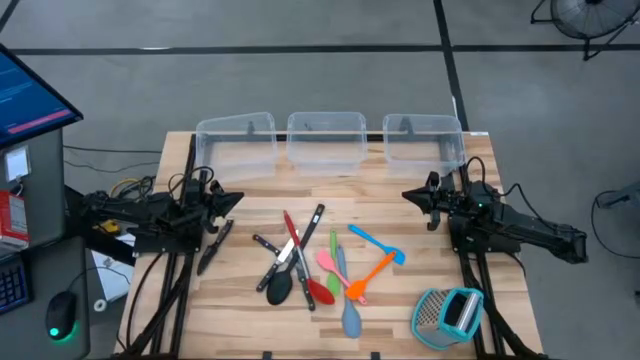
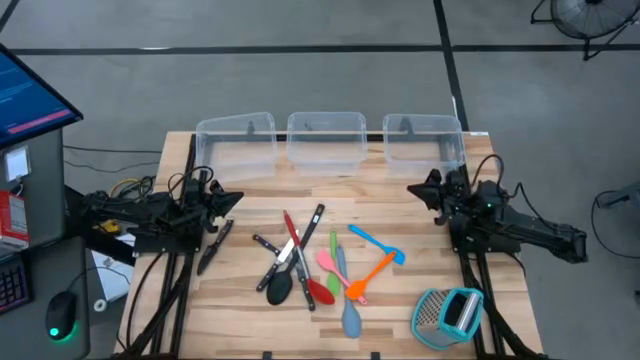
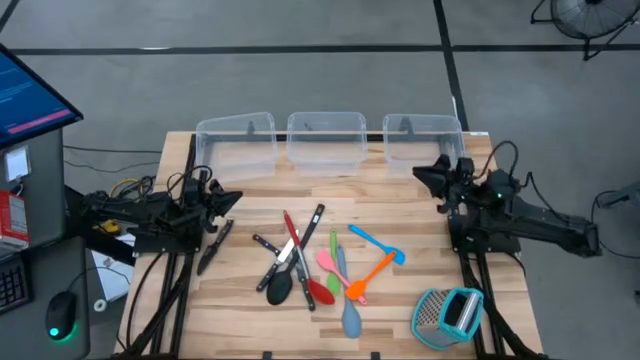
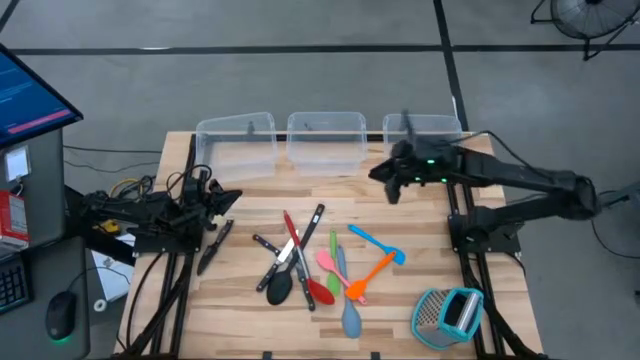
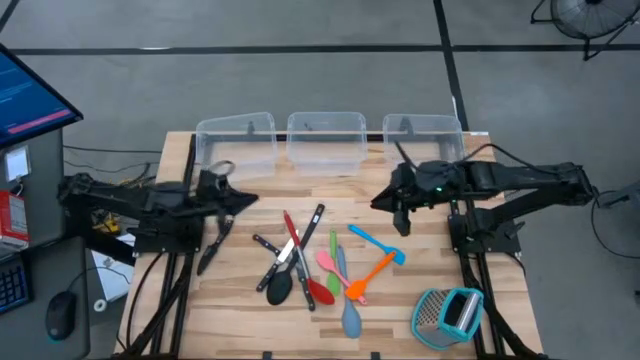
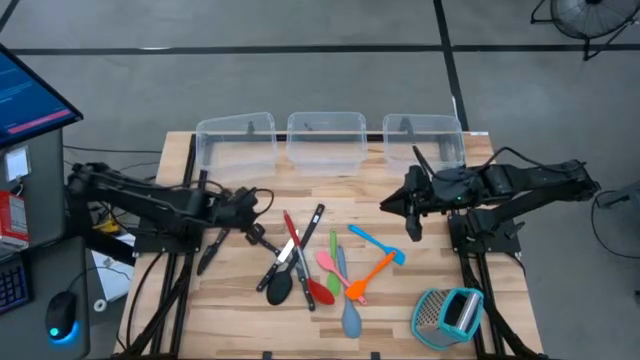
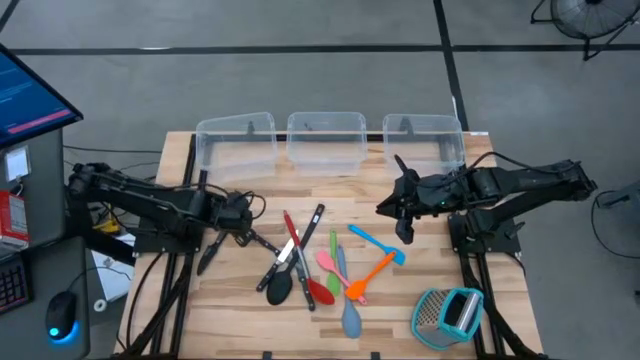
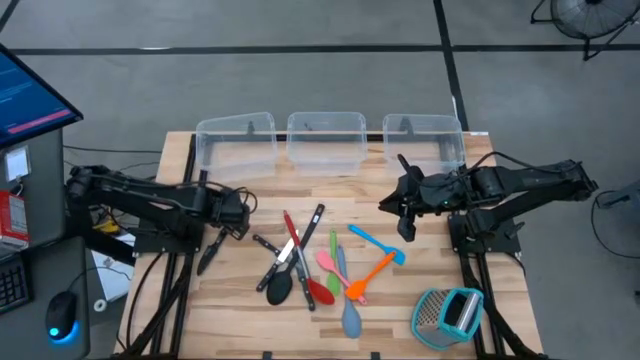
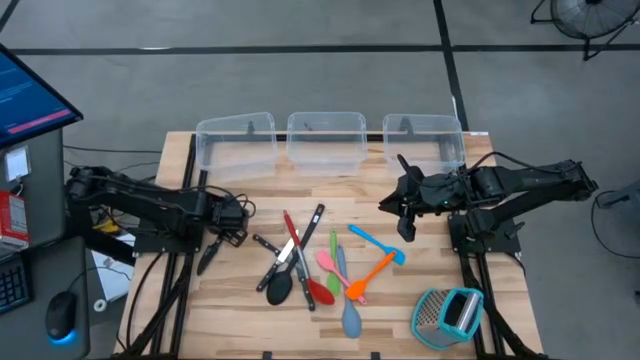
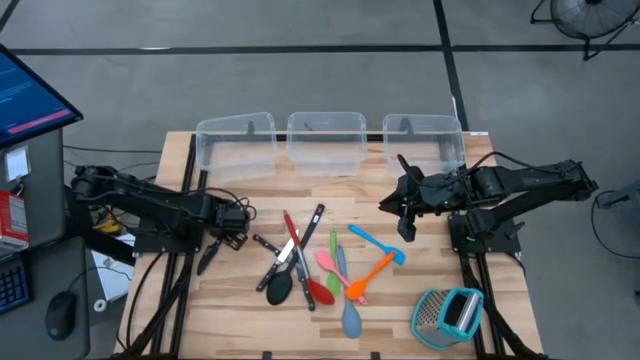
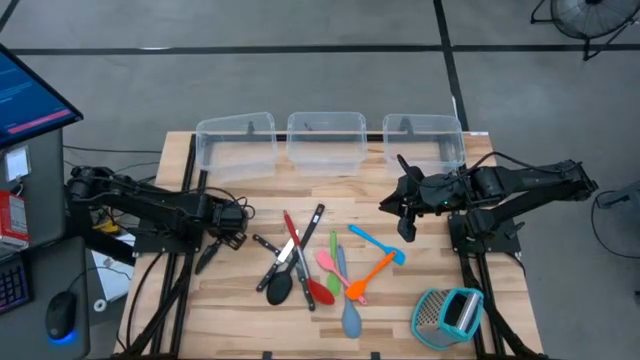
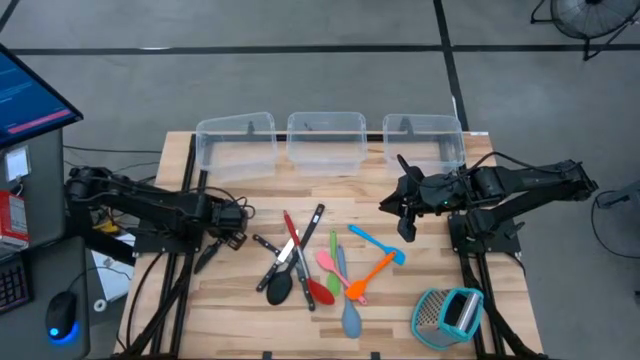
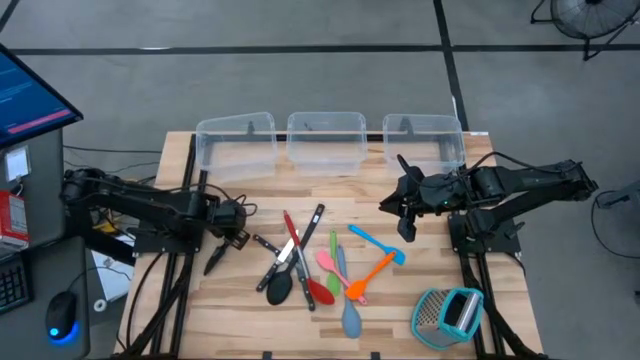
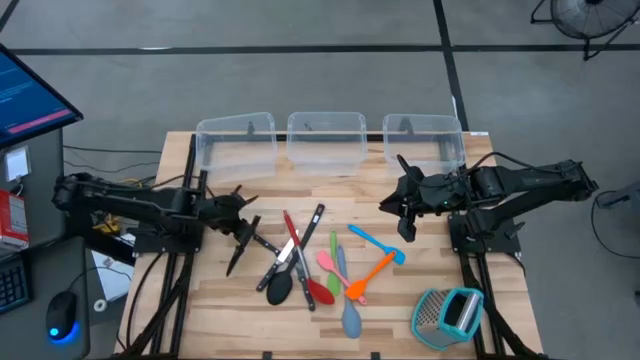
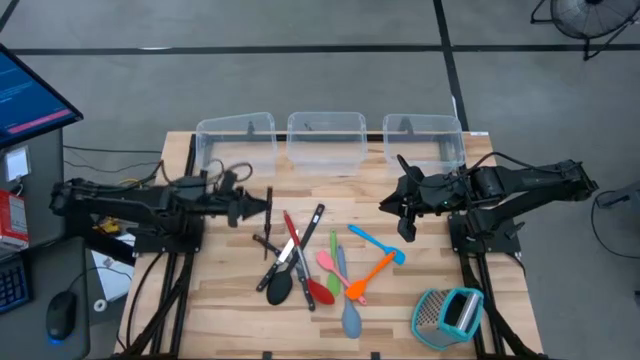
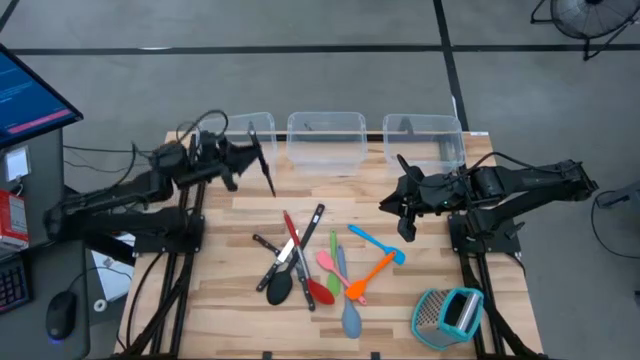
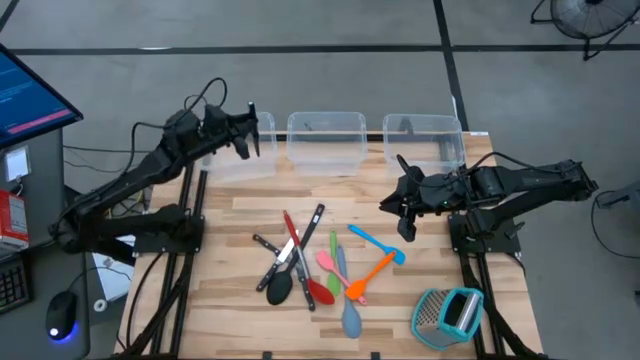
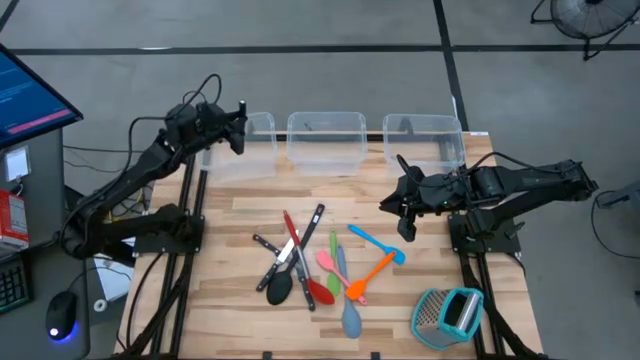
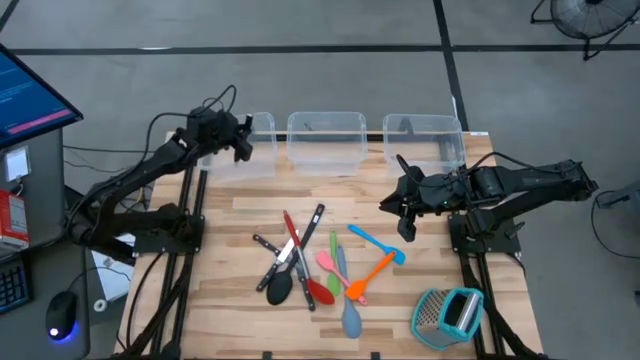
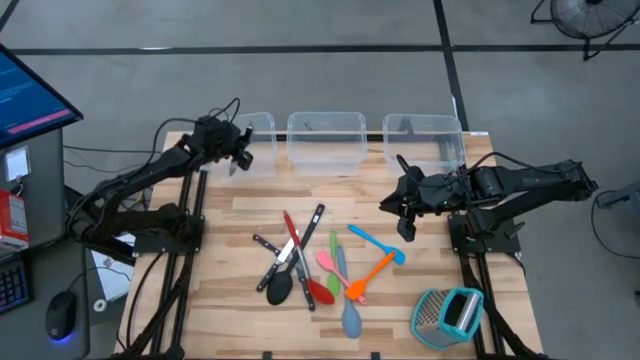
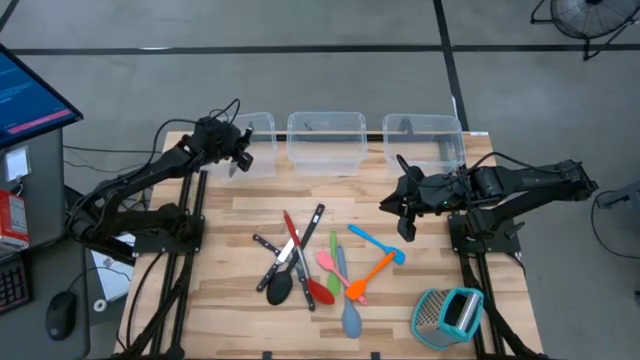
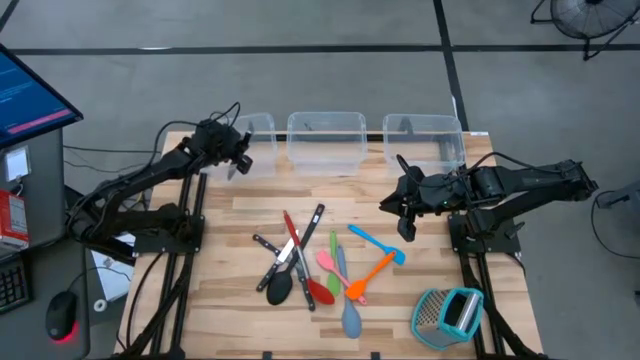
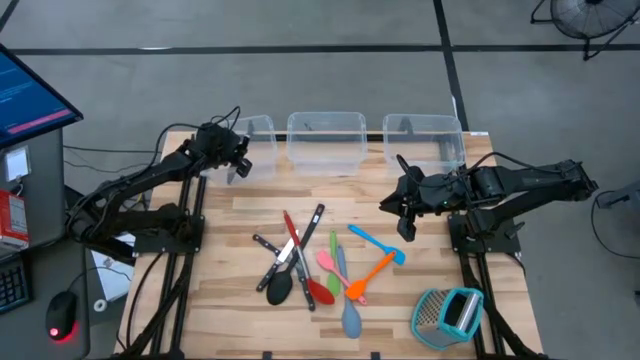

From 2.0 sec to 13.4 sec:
Task: Pick & Place Kitchen Items
Put the black knife into the top left transparent bin

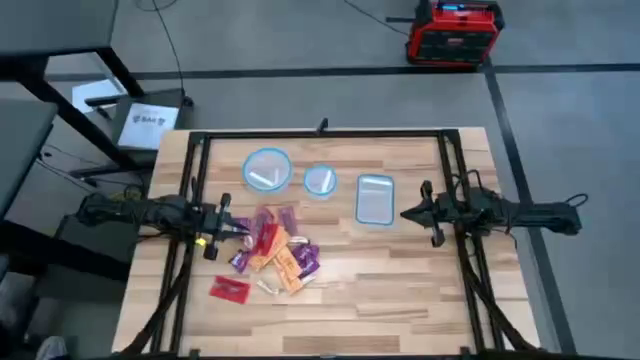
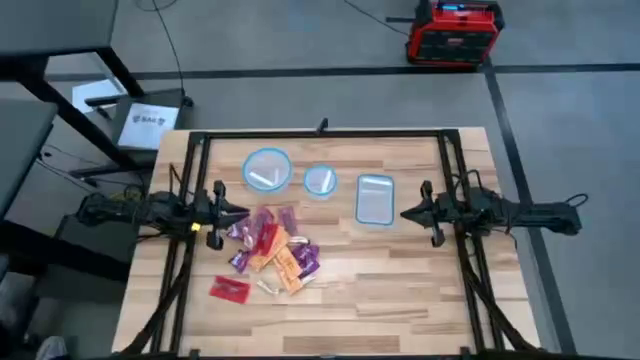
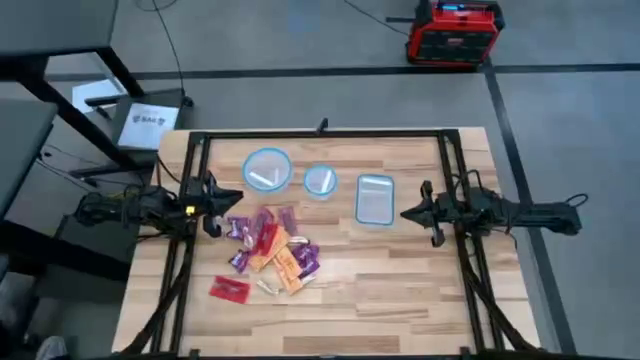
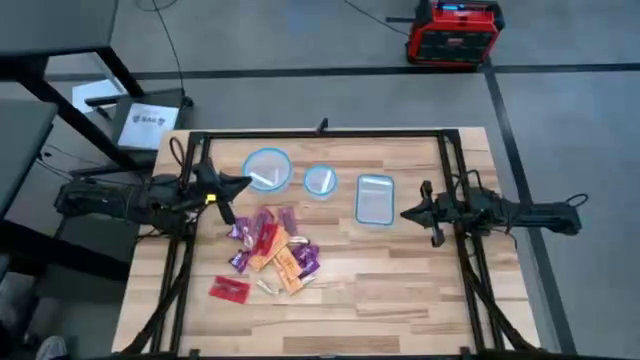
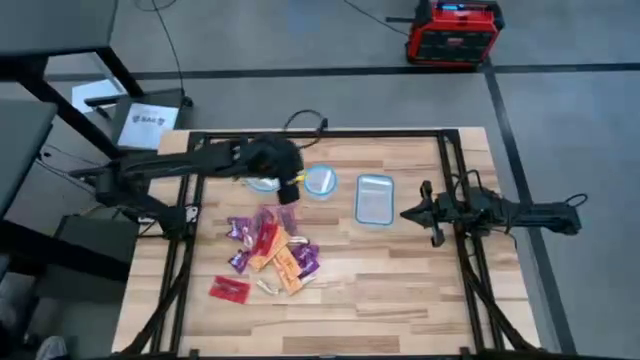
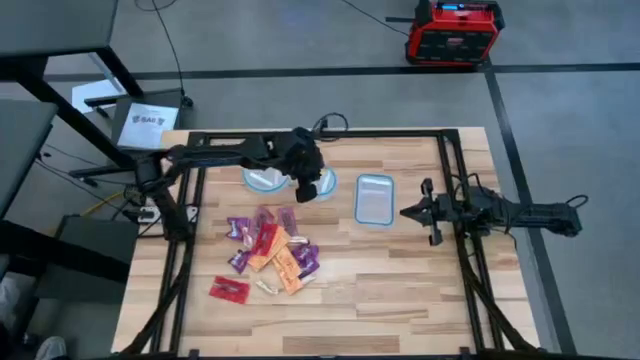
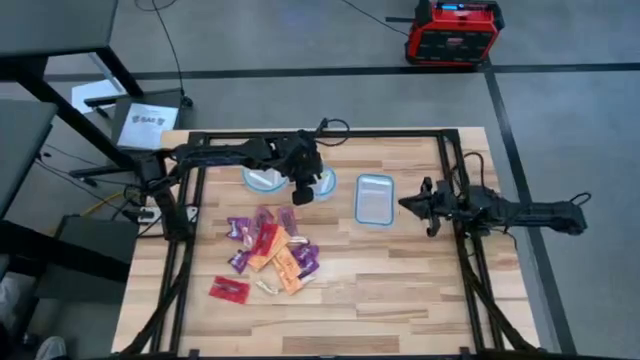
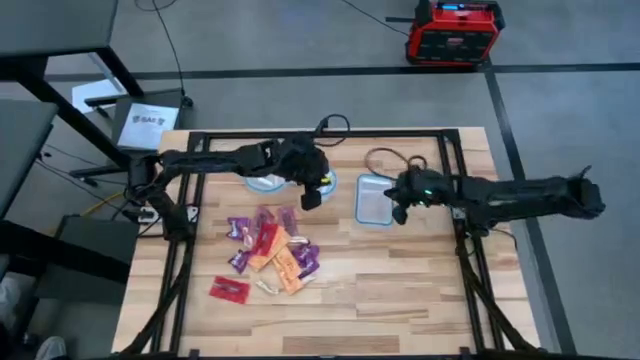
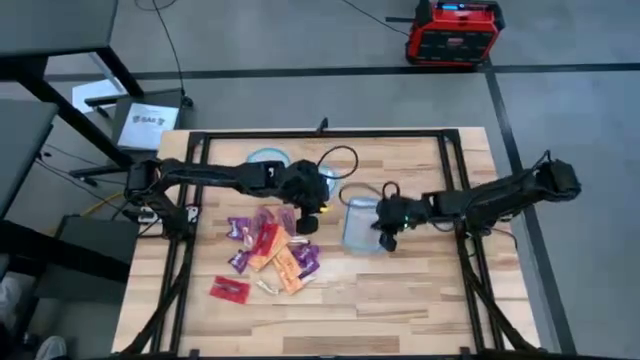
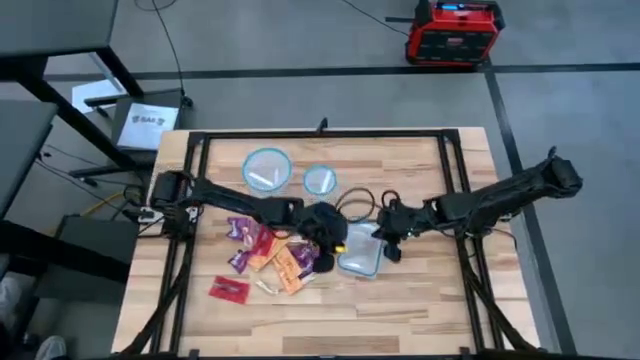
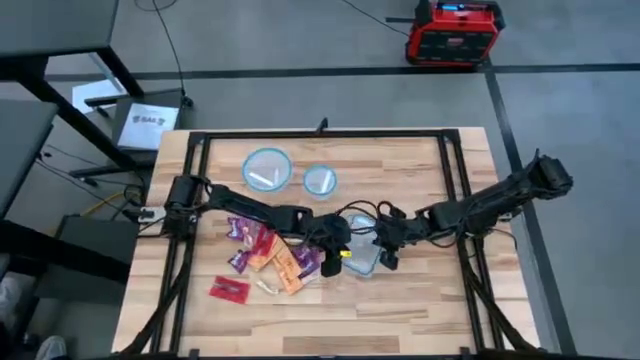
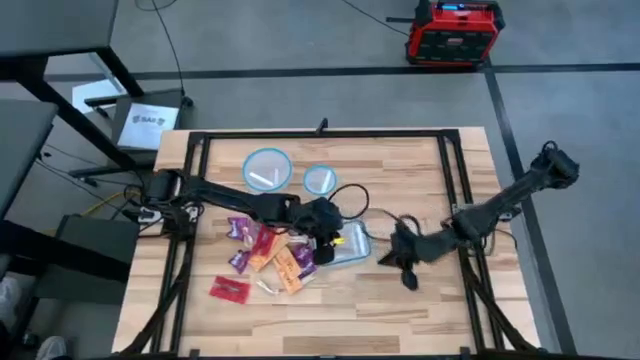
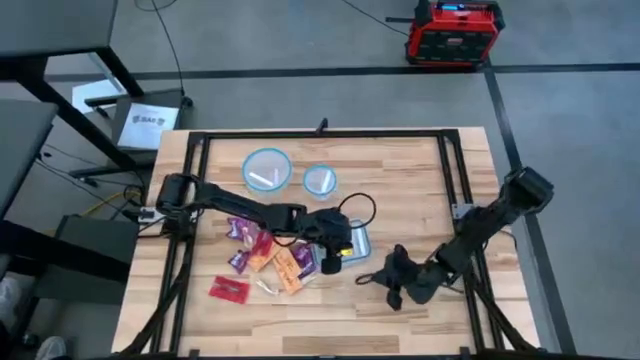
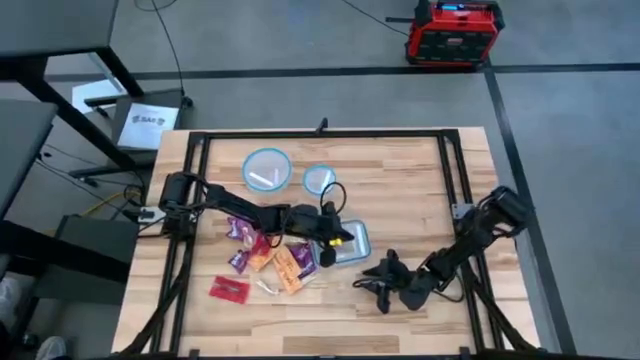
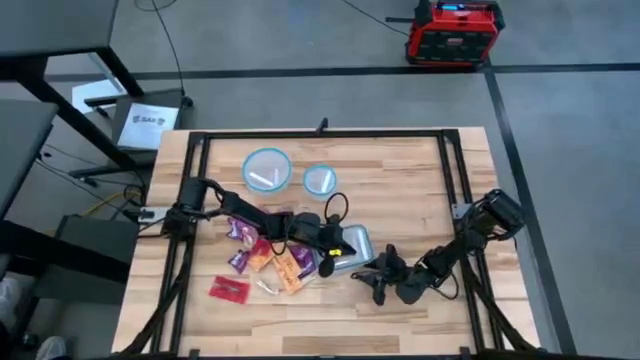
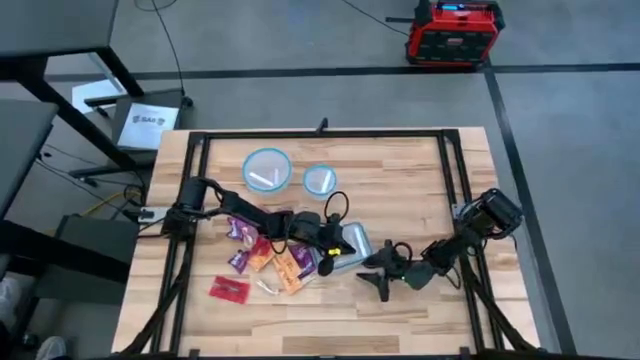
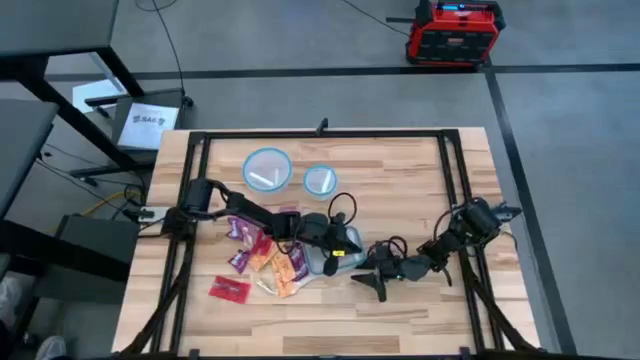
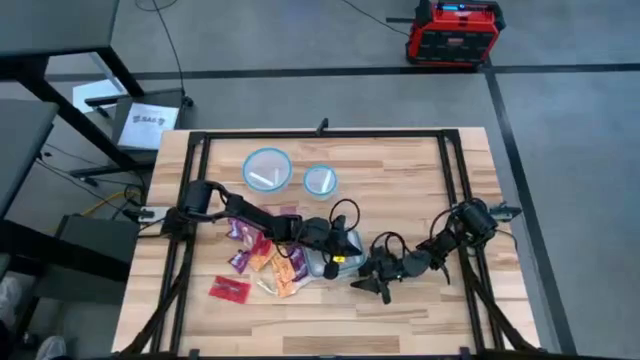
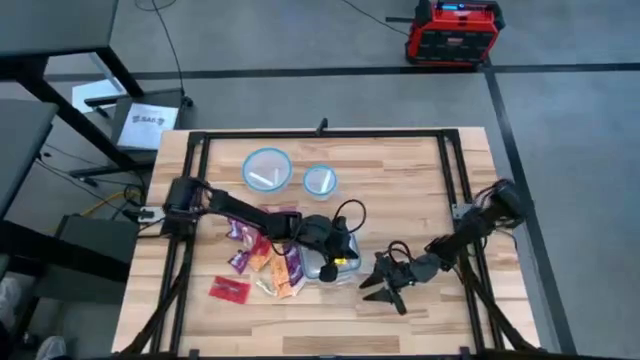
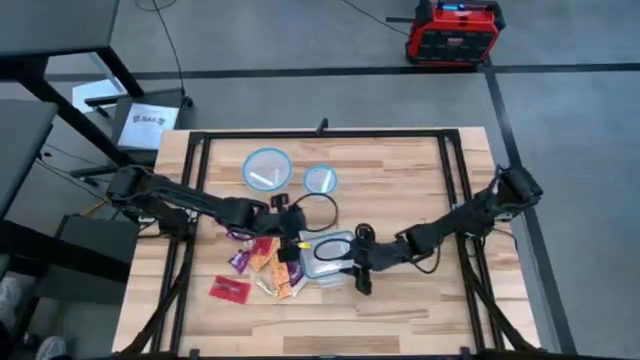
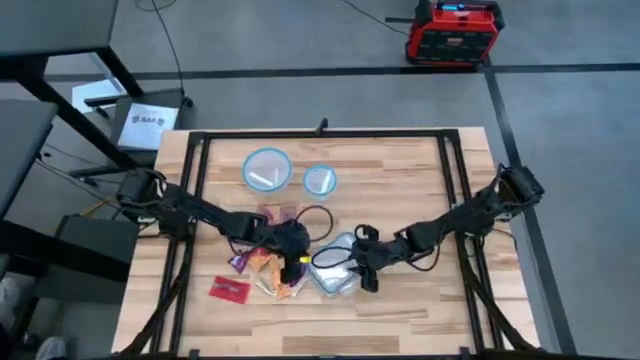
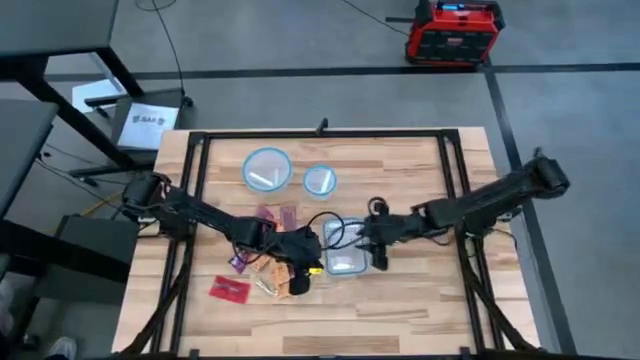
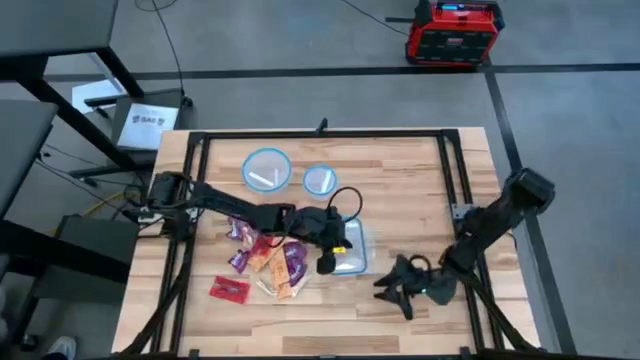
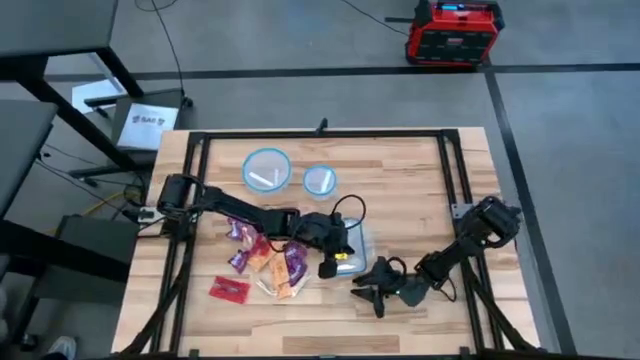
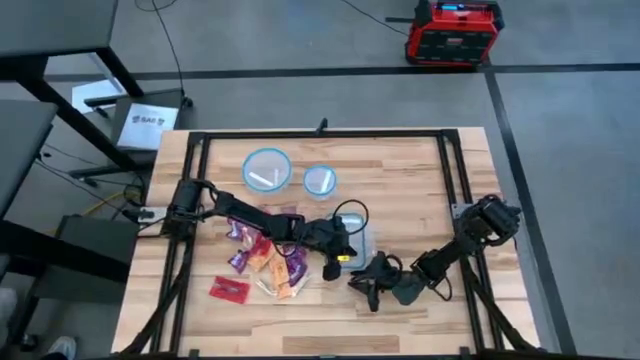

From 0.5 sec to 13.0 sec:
Task: Sort candy
Open the top right transparent bin
